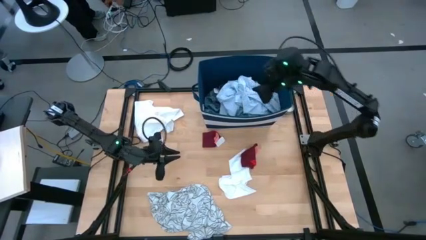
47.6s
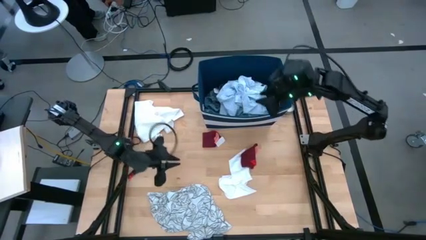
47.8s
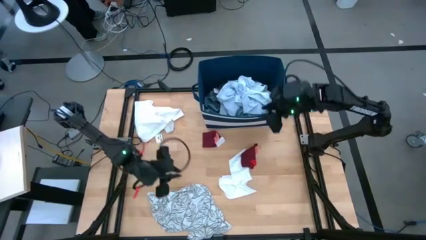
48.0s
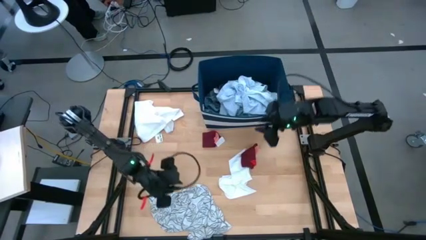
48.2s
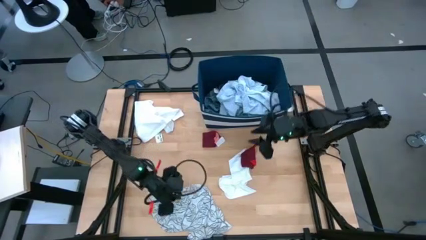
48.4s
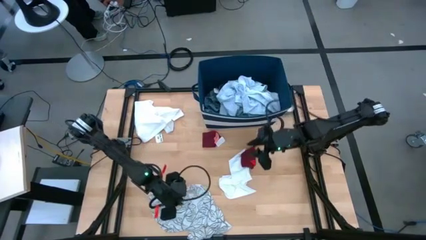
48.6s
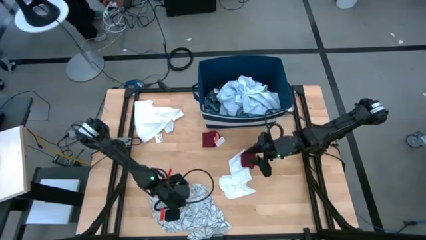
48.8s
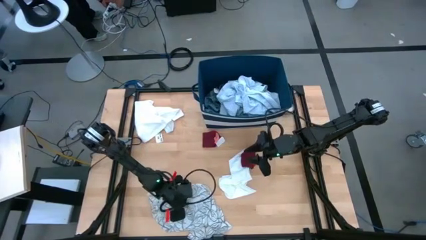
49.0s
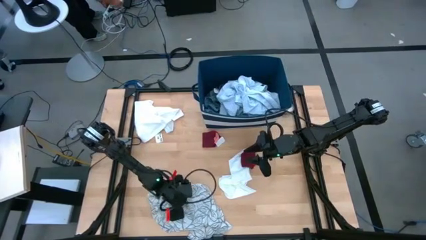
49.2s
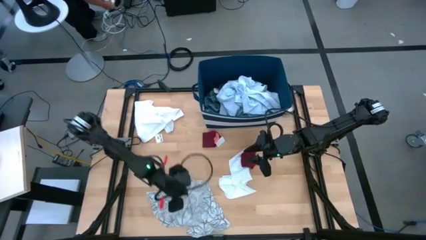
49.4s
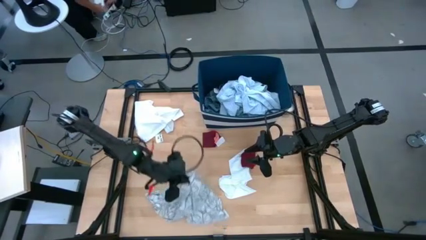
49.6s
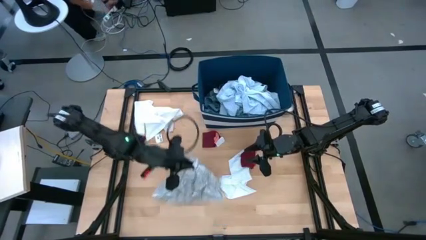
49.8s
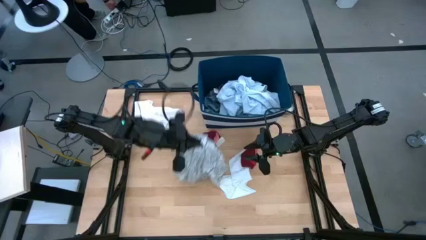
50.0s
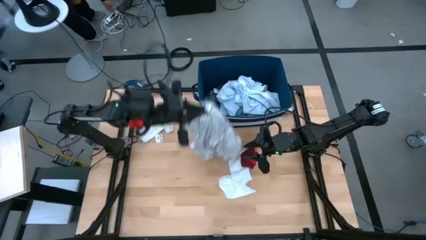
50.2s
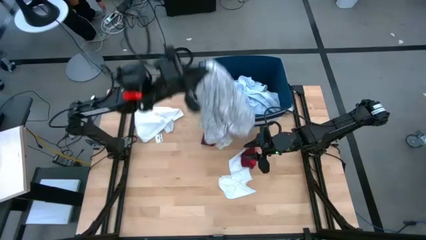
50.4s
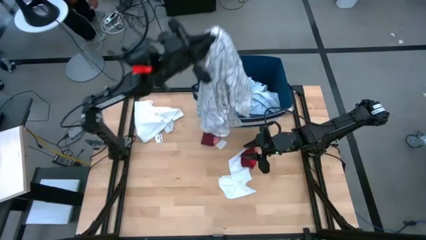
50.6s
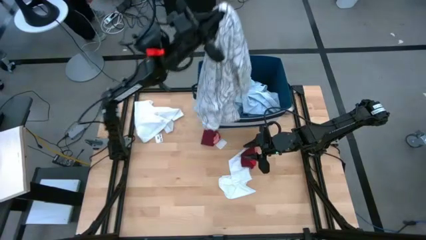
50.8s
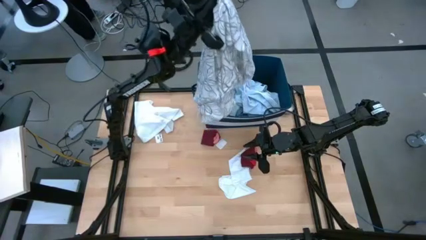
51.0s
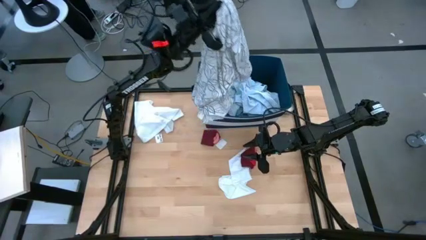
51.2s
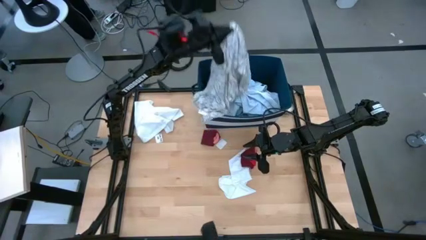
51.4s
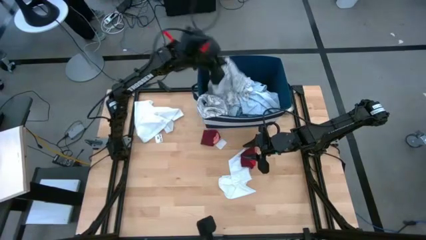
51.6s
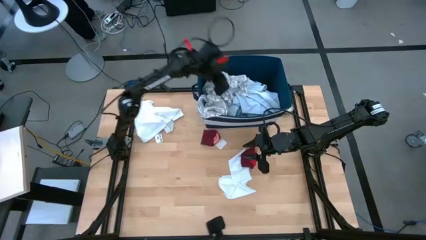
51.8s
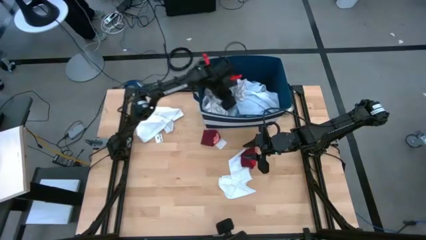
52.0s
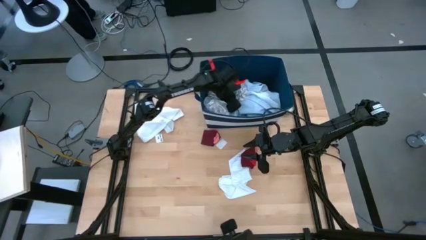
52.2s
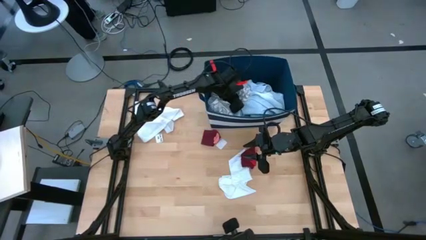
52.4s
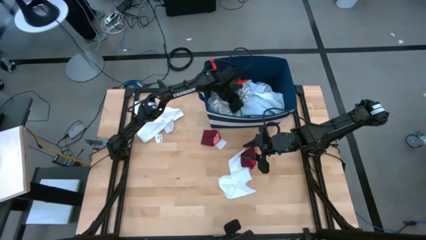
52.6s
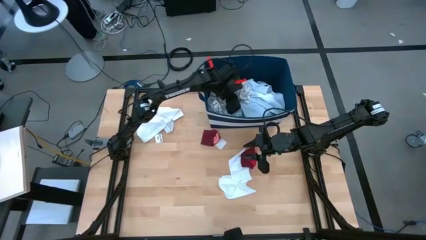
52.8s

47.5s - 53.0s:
Task: Sort clothes
Put the white shirt into the blue bin

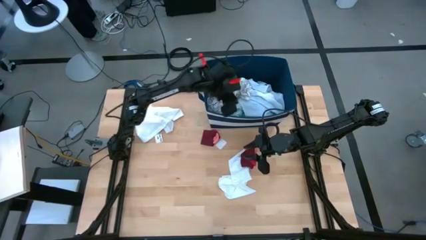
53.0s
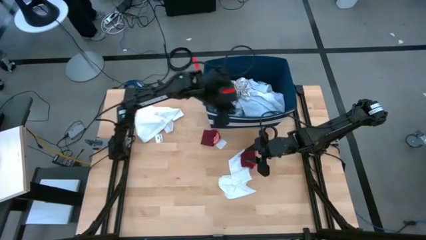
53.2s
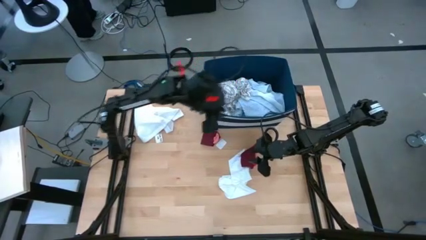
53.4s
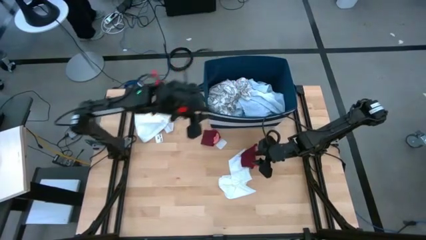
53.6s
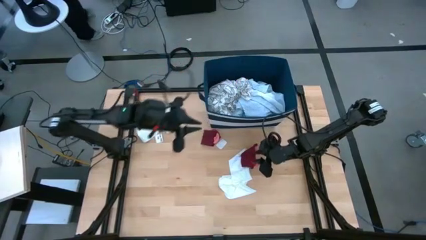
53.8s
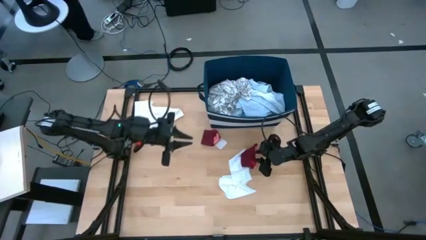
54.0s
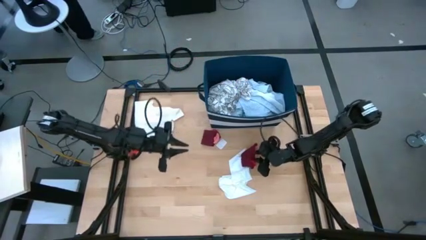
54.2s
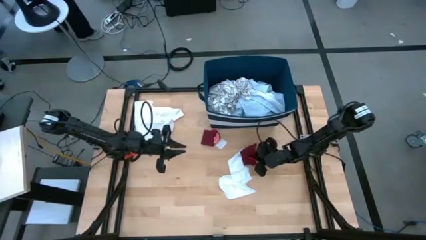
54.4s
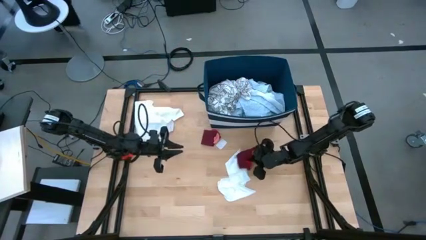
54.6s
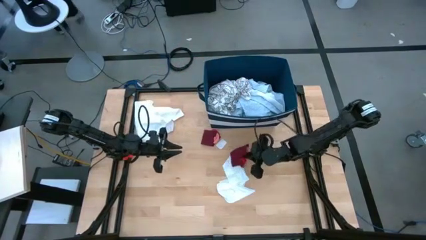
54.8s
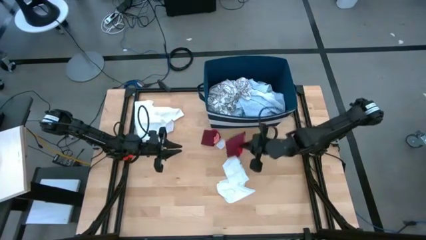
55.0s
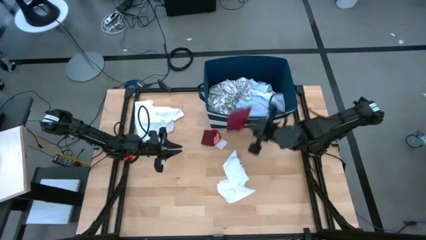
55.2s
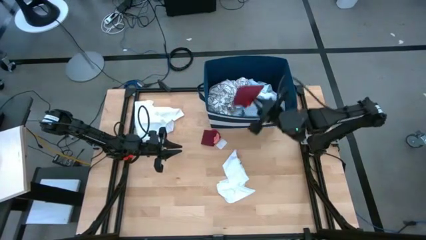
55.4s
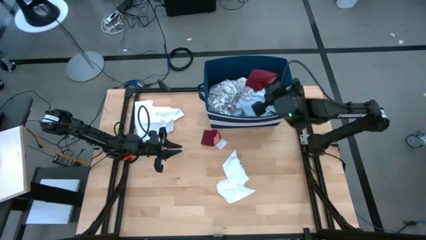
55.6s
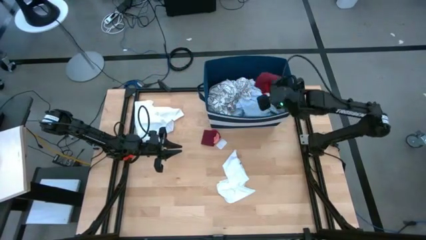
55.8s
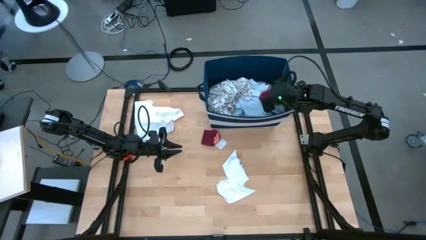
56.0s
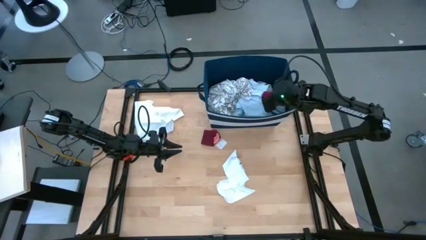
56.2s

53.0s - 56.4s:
Put the red socks into the blue bin

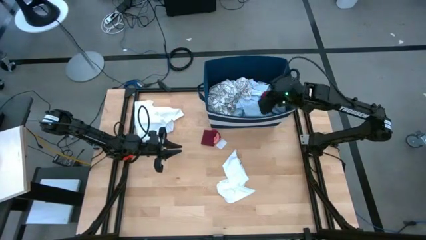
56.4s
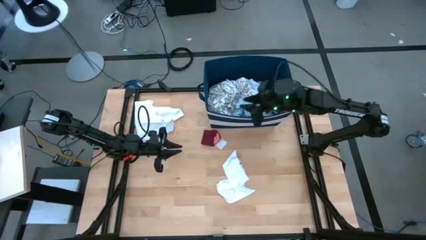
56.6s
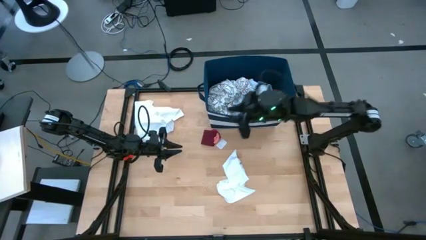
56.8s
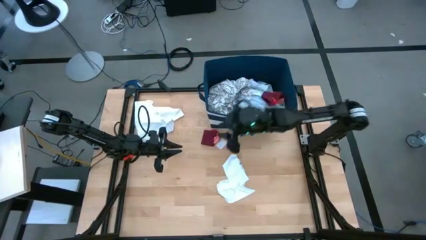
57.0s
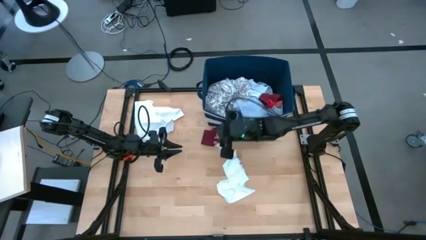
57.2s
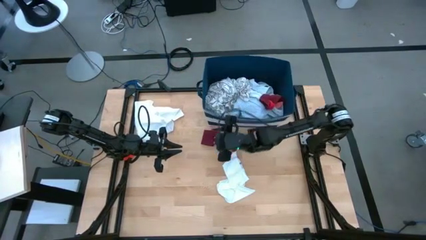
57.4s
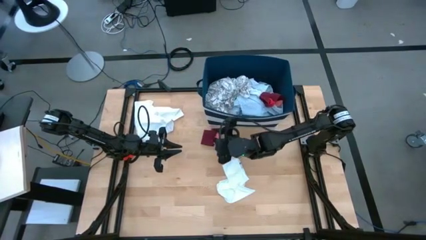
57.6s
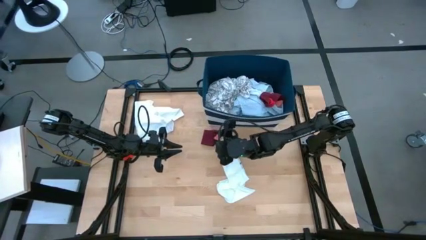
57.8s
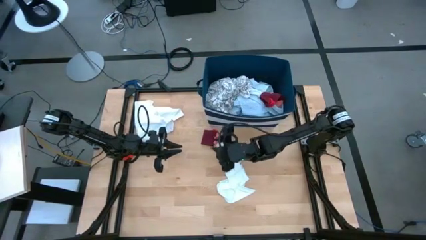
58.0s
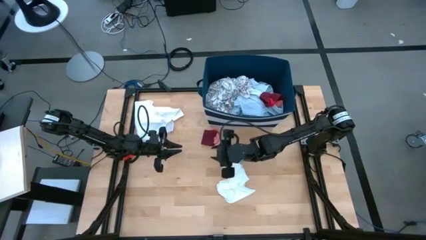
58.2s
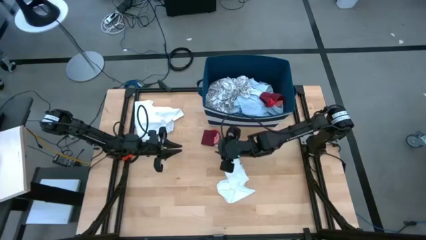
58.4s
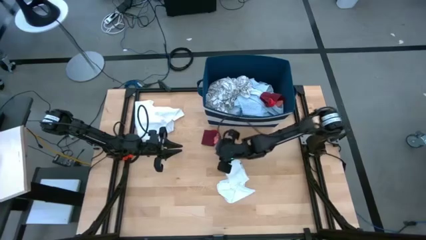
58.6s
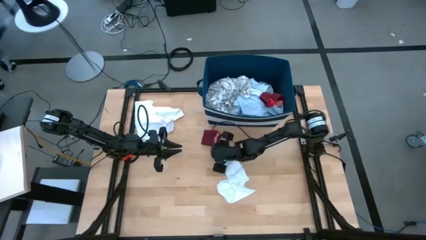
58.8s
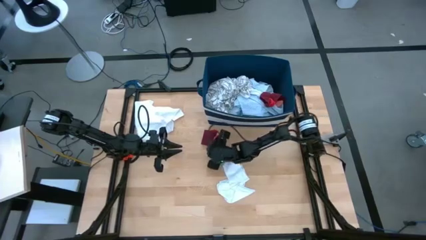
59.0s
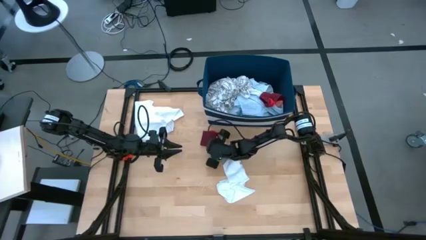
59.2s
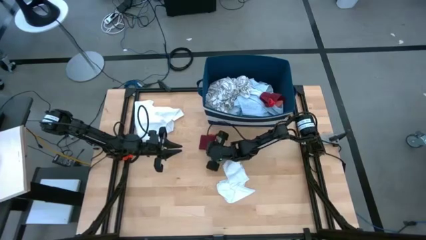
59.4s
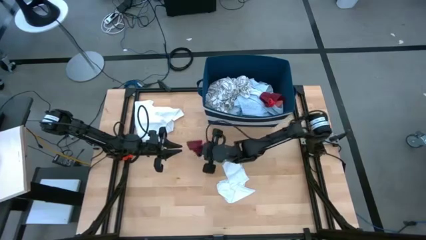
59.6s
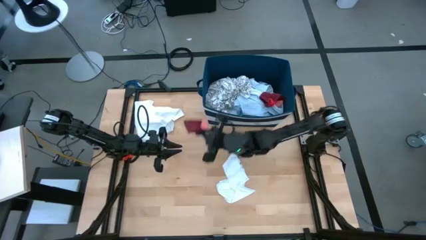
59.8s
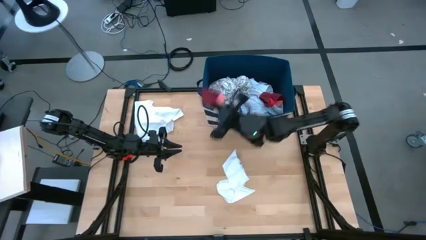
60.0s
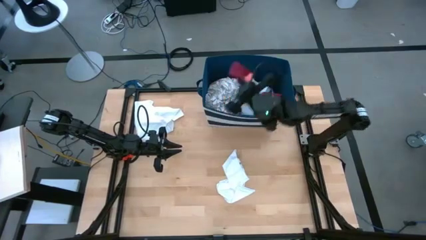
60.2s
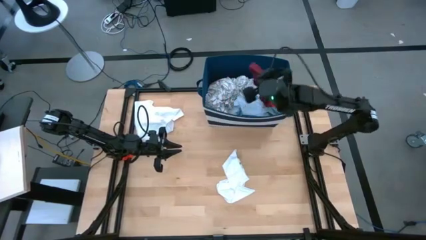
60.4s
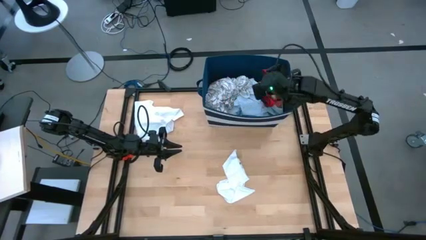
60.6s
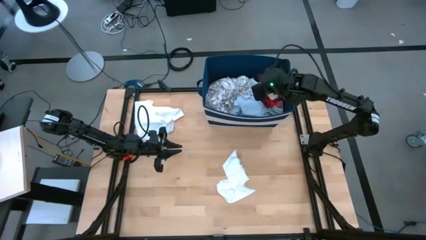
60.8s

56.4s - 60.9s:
Put the red socks into the blue bin

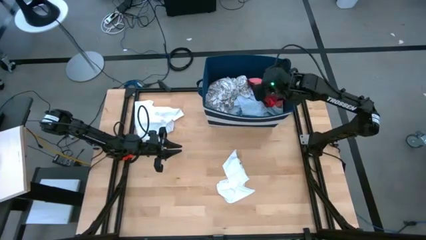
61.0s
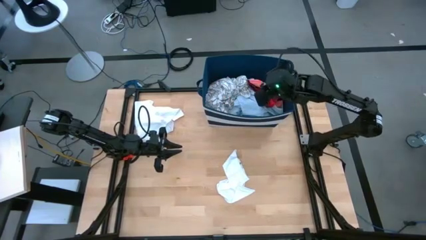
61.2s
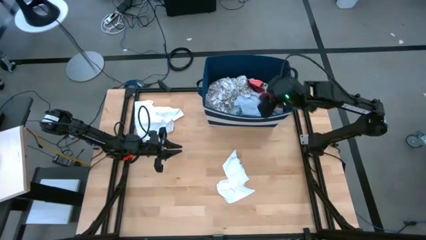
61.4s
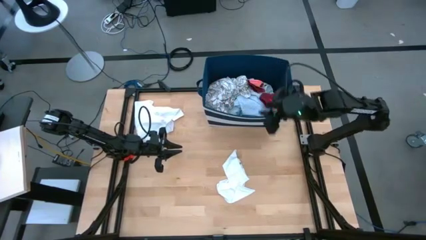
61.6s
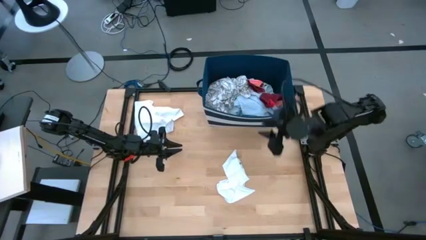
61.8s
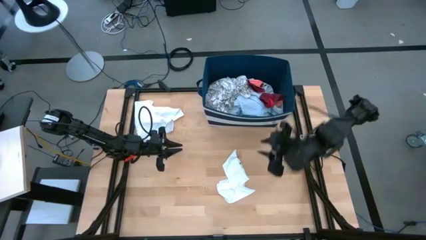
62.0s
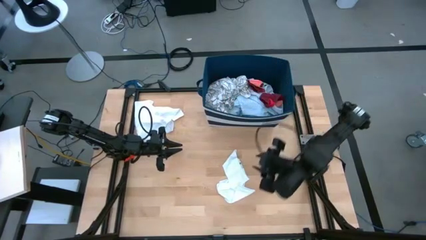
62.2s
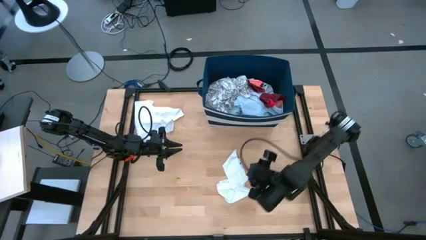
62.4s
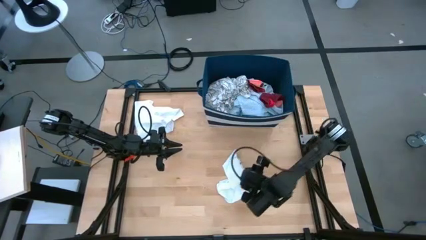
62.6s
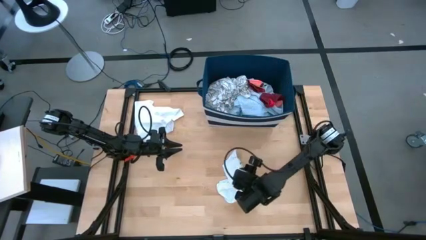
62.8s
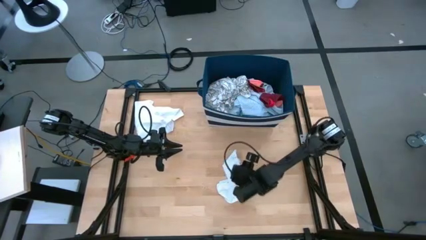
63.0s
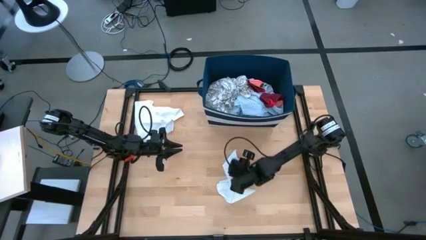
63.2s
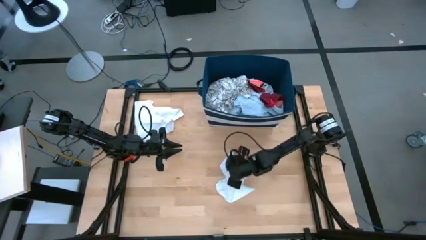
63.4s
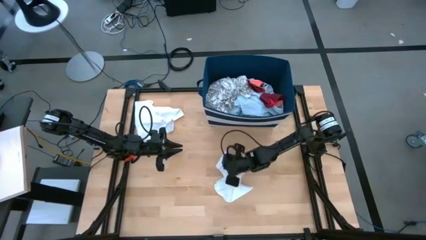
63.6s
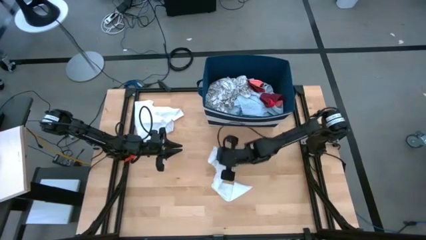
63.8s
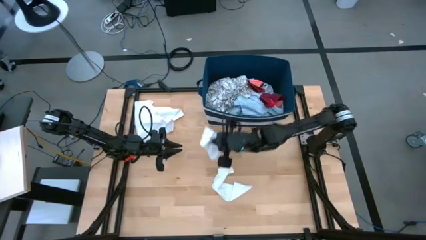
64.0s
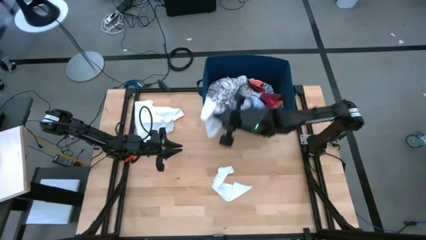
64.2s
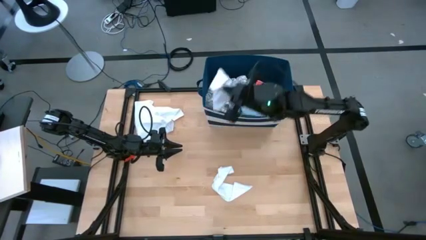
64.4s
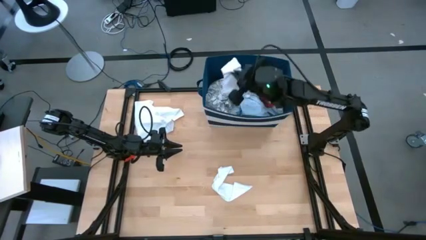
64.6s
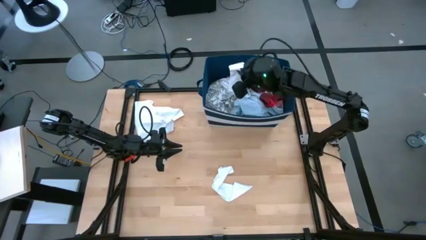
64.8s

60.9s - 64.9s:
Put the white socks into the blue bin
